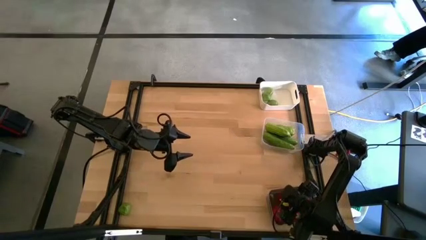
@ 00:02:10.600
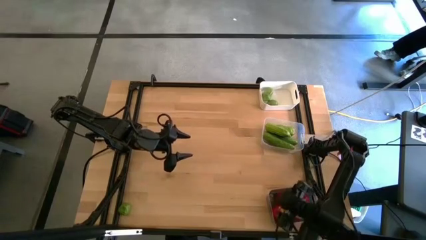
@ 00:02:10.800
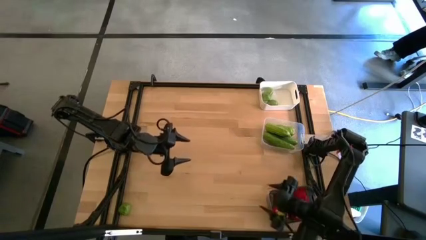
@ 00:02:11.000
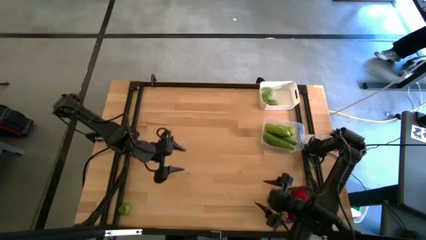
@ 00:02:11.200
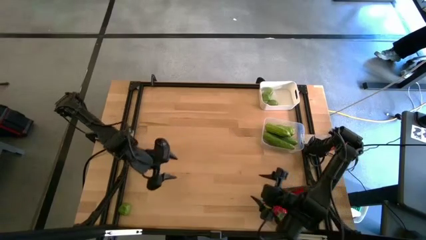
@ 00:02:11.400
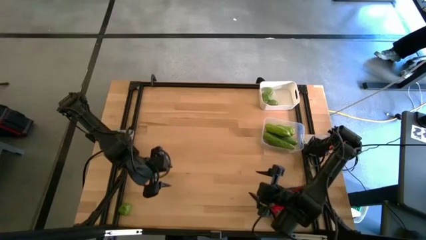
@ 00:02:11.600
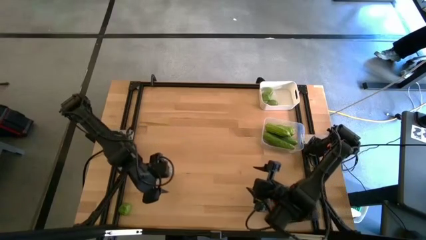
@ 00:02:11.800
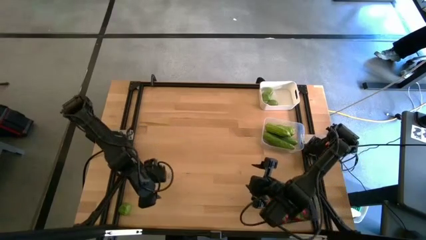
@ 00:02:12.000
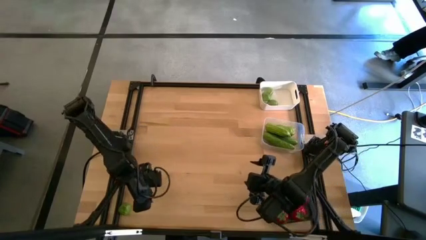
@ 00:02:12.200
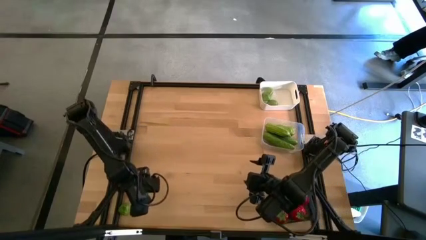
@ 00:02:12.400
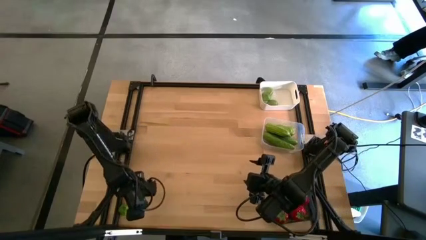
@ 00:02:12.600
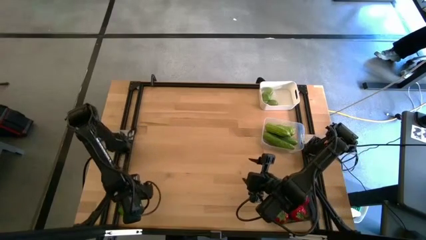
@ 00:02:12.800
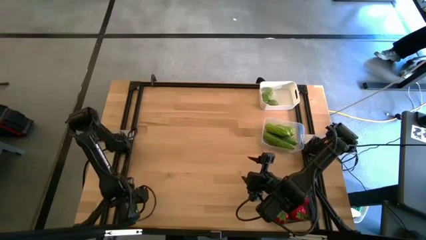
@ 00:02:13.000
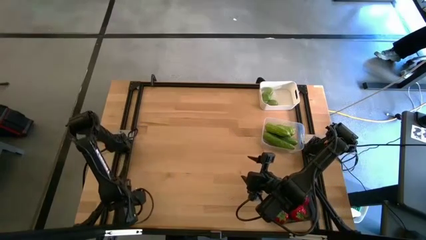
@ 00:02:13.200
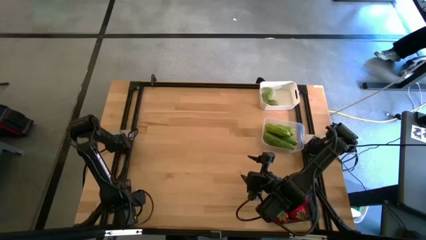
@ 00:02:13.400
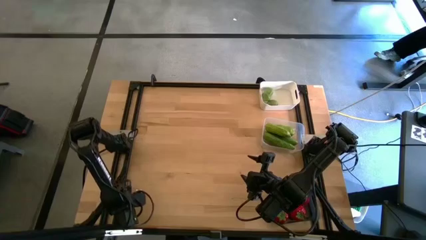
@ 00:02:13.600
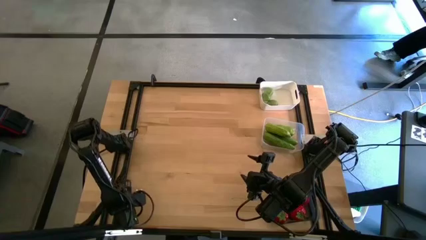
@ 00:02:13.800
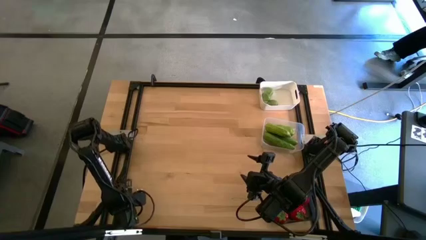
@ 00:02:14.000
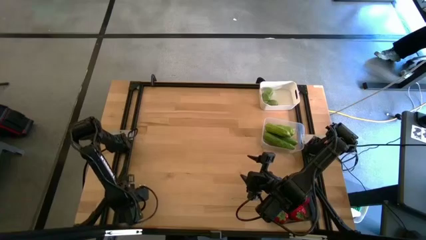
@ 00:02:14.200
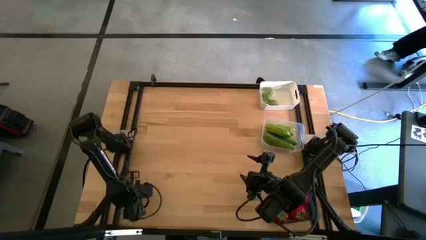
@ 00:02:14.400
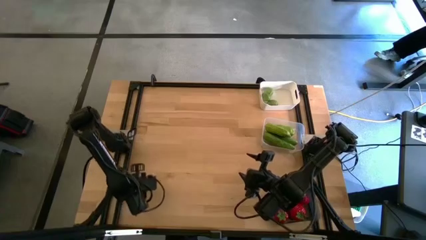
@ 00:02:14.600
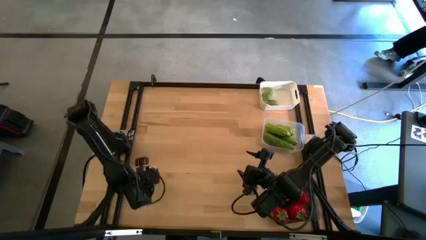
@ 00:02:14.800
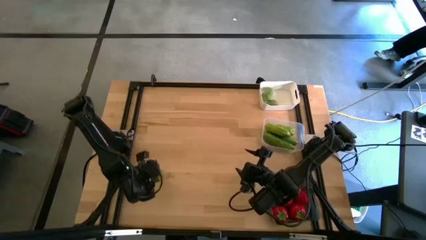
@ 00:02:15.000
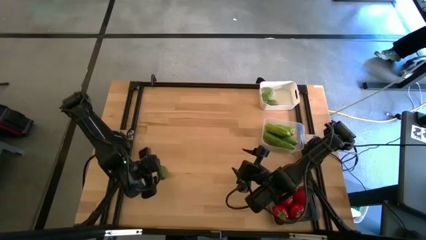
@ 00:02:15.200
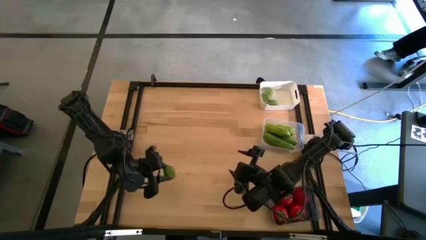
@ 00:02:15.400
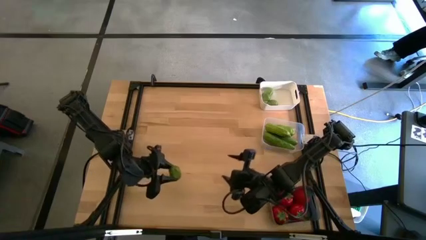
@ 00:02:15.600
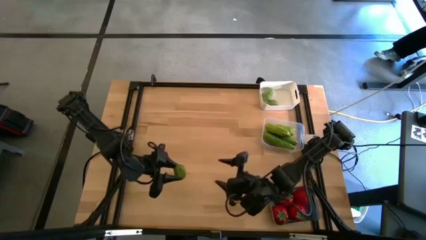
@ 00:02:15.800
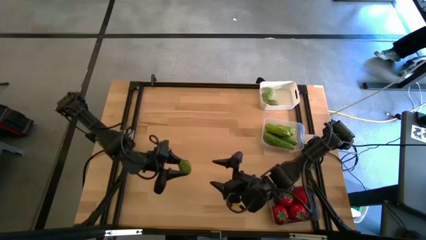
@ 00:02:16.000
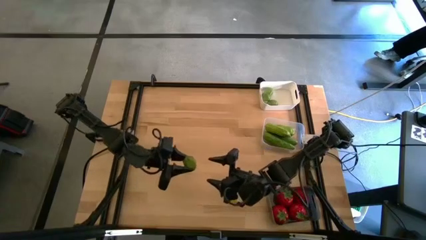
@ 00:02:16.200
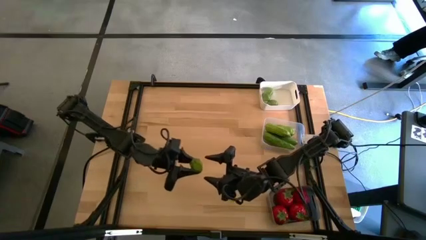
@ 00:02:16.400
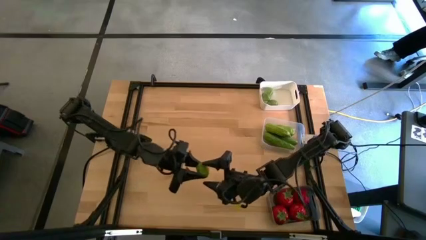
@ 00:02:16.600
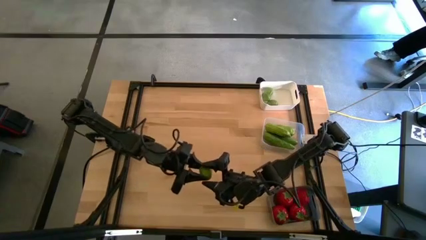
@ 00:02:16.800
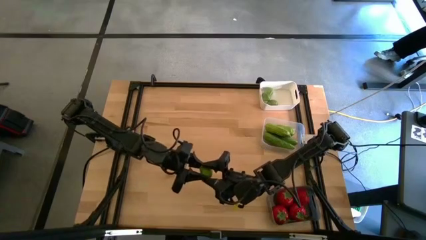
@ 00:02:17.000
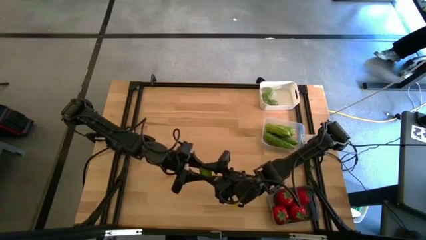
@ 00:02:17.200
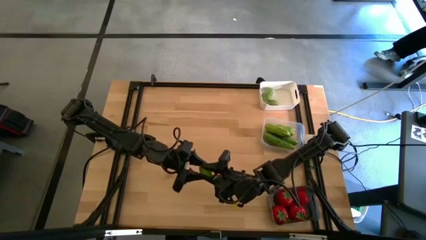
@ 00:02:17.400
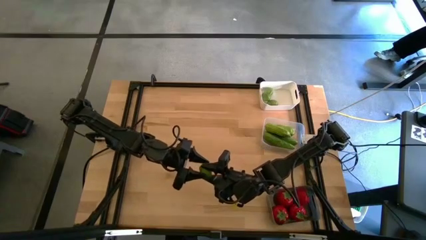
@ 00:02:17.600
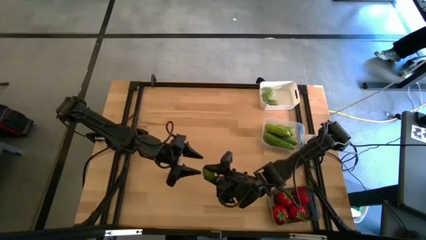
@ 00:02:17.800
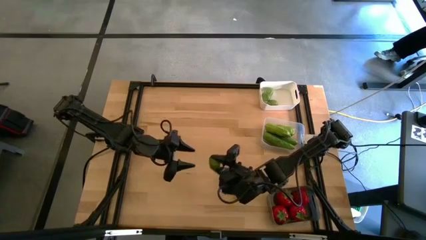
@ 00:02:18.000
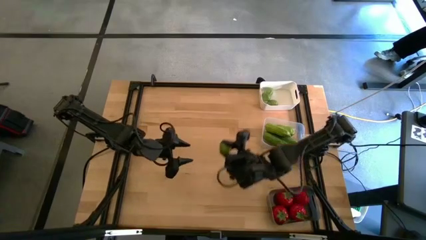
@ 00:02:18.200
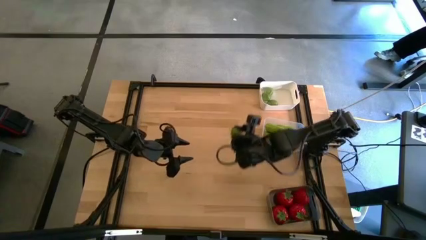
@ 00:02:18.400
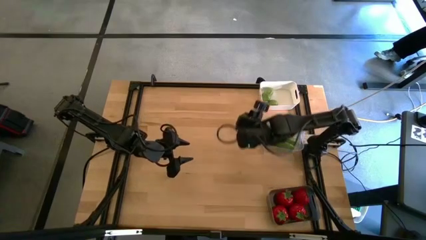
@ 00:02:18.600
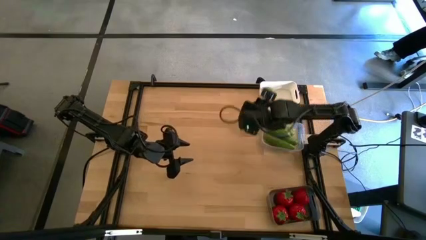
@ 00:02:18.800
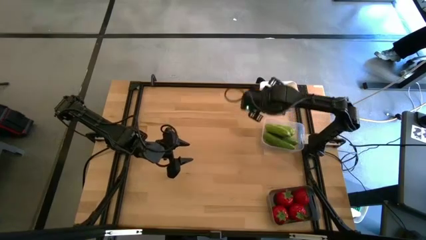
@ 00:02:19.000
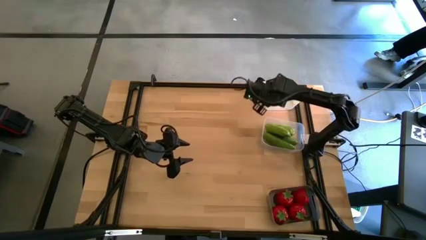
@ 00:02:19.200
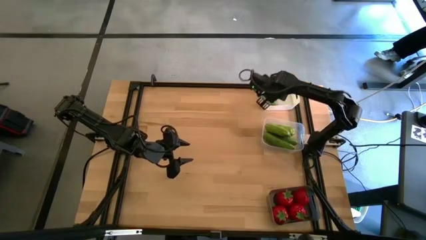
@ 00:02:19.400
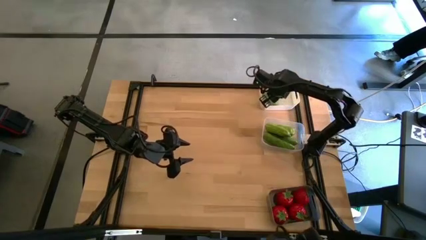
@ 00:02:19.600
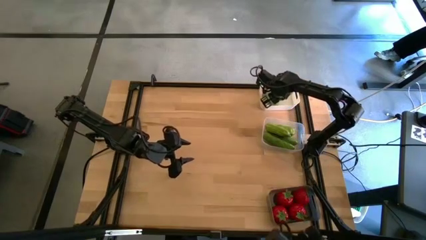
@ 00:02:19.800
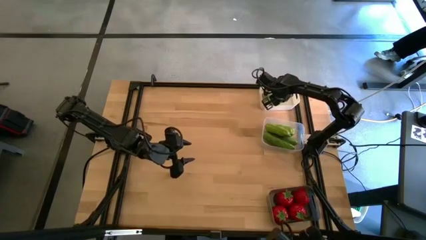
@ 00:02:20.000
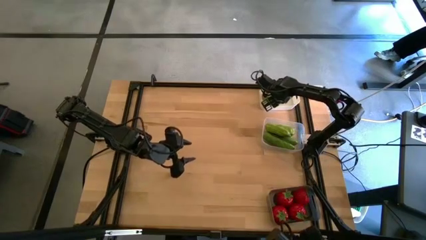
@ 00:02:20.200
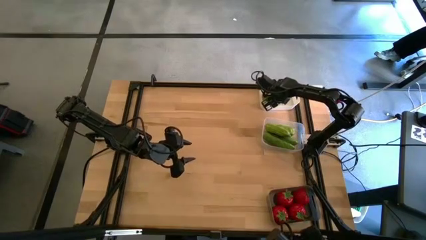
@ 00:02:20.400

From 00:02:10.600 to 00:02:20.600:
Task: Sort produce into baskets
Put the lime into the white bin

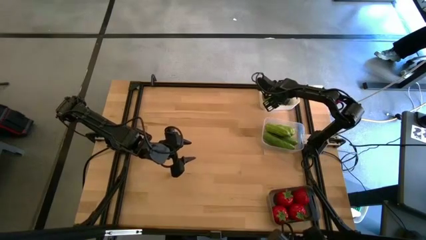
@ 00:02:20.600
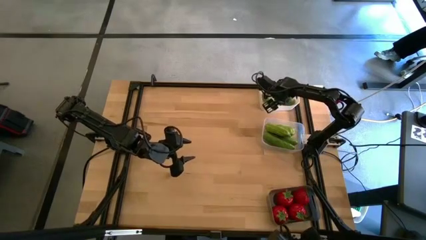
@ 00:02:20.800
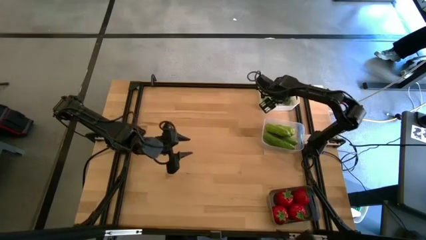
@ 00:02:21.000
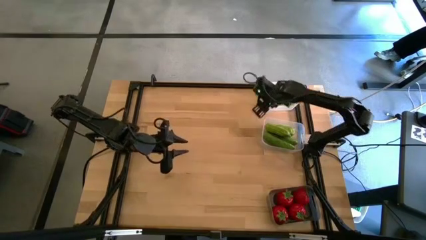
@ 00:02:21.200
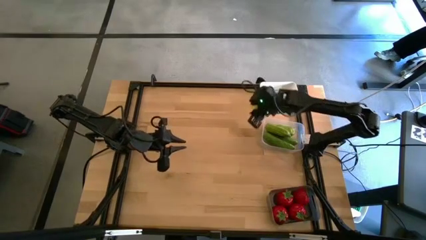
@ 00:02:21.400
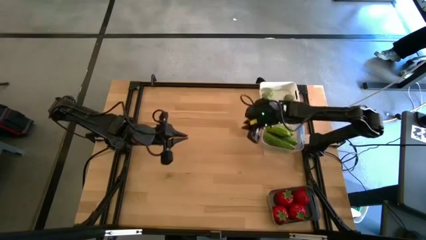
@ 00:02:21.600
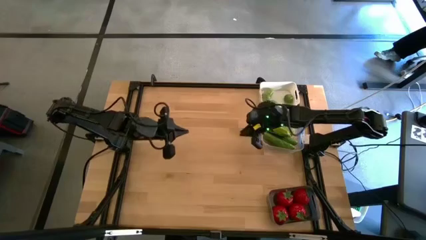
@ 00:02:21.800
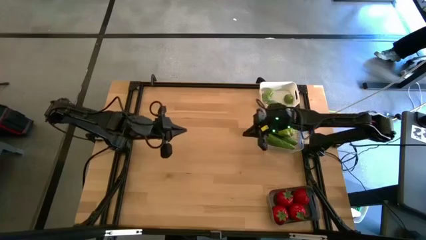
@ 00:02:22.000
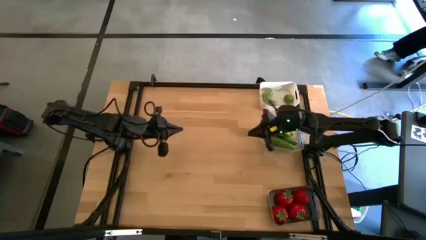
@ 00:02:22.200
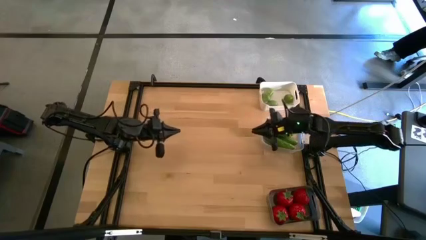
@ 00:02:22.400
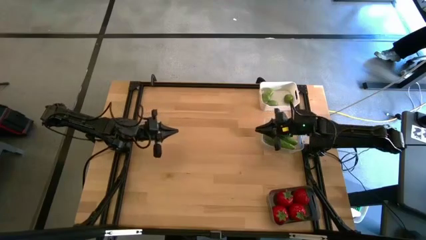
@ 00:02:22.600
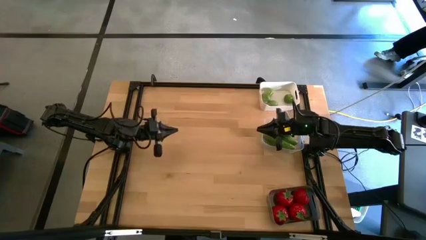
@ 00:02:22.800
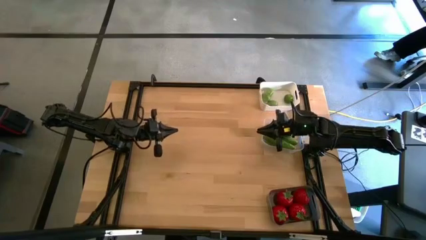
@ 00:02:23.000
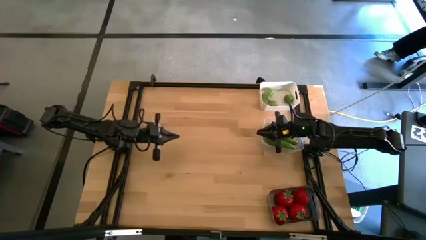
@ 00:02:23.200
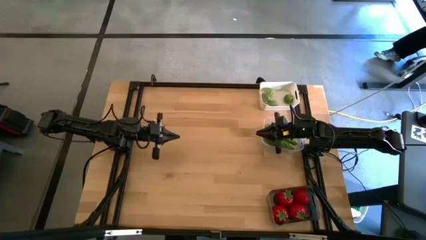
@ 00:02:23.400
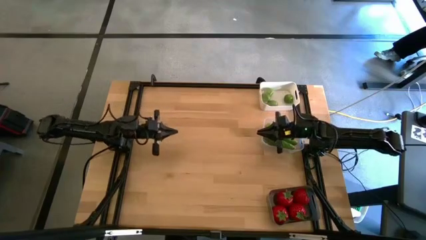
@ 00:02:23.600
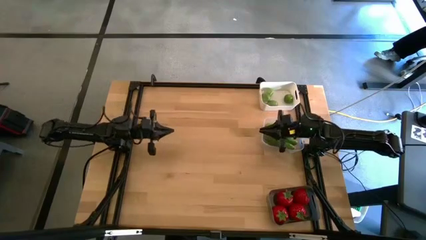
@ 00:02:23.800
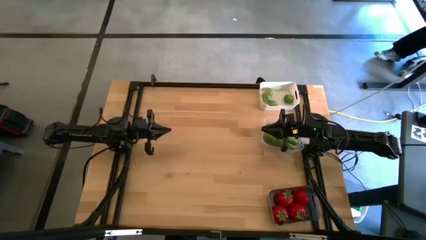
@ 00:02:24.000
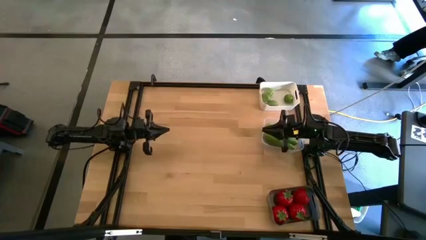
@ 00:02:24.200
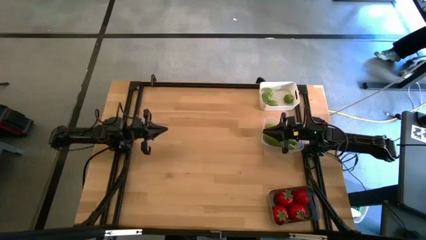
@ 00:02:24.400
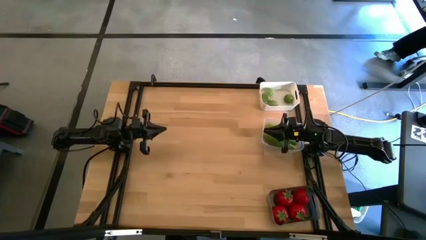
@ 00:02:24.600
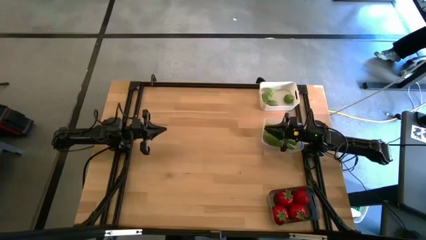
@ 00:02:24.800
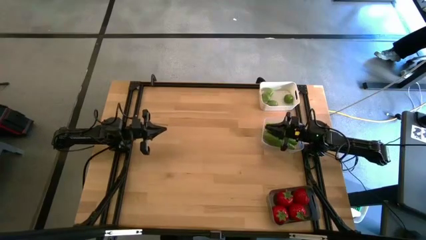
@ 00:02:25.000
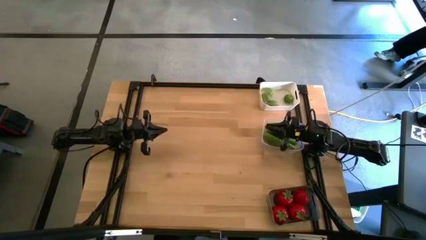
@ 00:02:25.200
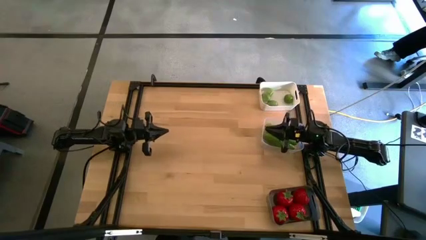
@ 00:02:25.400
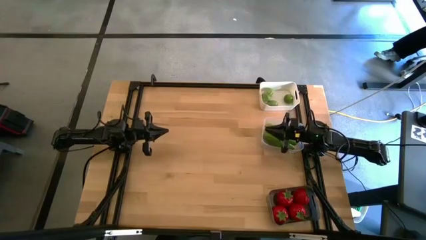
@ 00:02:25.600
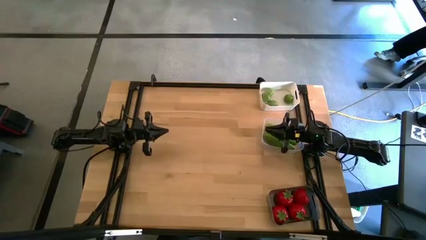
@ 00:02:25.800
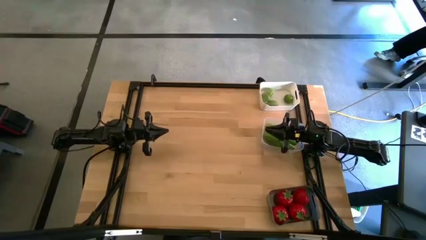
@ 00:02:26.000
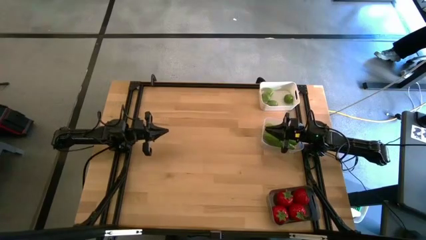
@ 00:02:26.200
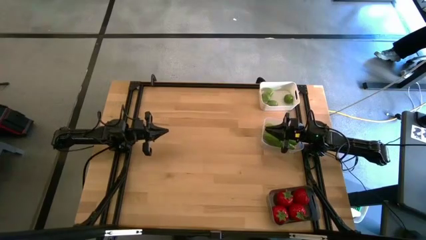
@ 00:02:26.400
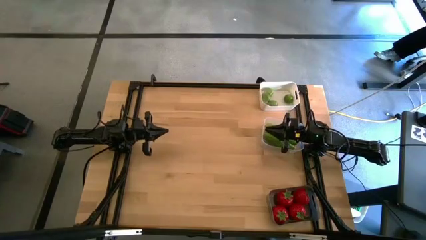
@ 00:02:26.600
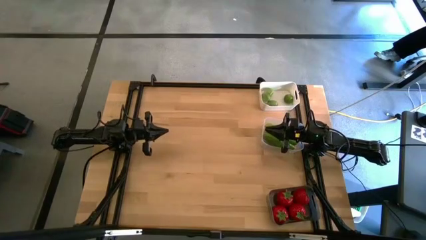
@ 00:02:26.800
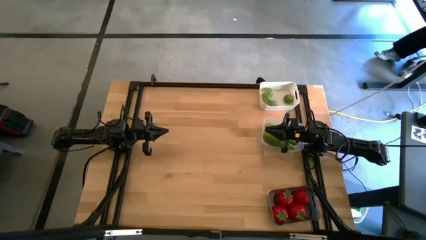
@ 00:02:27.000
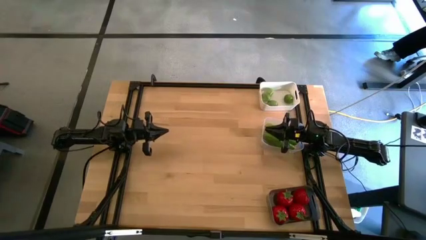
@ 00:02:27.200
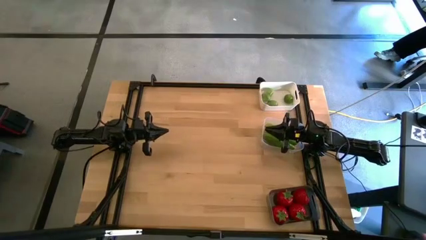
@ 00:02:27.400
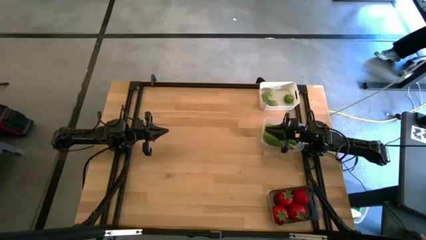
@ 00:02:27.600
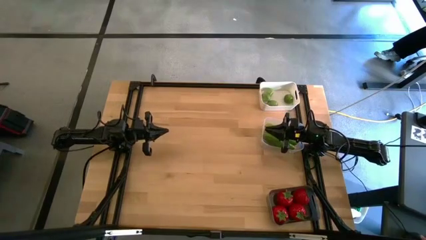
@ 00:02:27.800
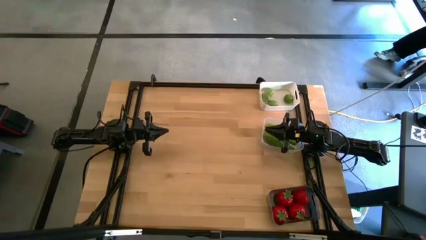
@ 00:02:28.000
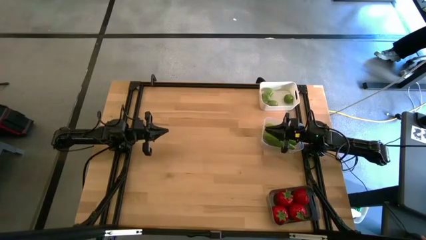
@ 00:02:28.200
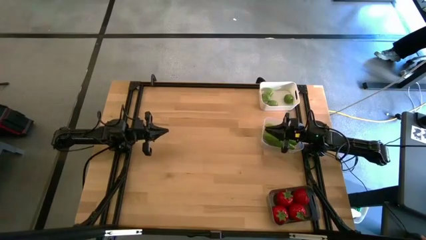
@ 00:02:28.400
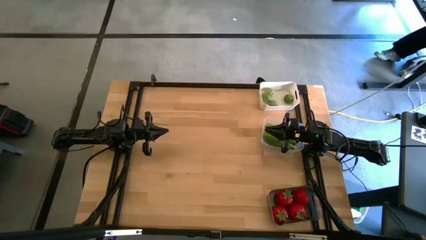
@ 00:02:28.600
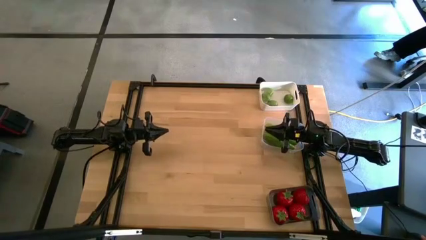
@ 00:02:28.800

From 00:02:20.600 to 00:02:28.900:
Return to Home Position
